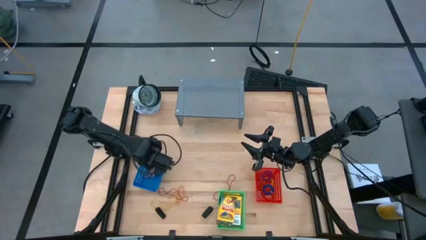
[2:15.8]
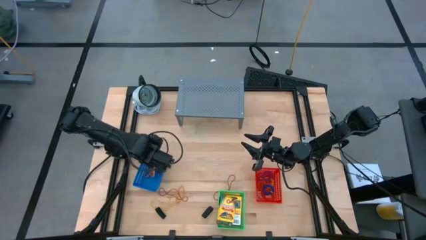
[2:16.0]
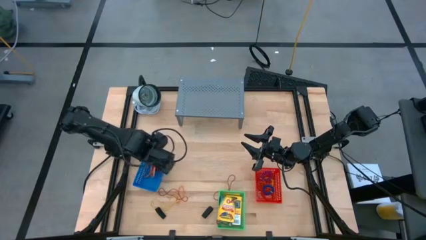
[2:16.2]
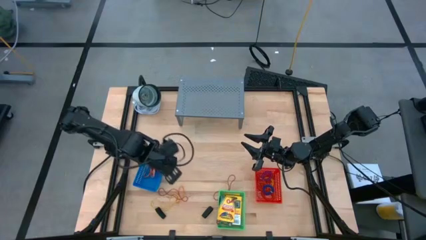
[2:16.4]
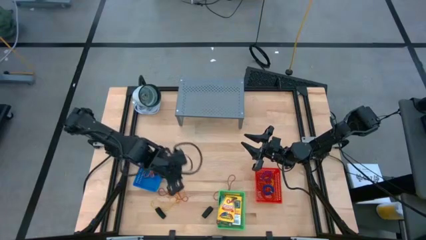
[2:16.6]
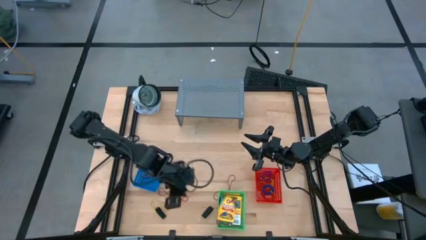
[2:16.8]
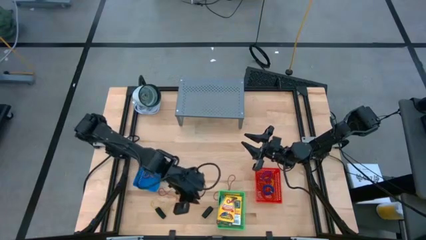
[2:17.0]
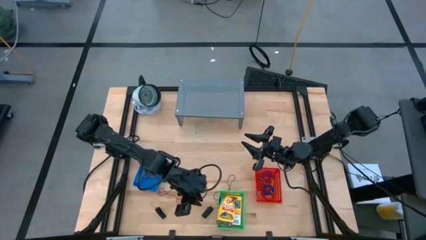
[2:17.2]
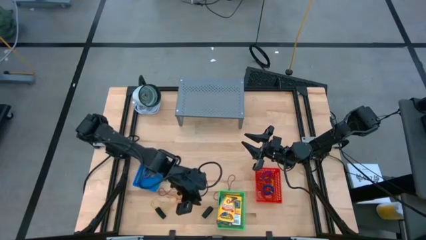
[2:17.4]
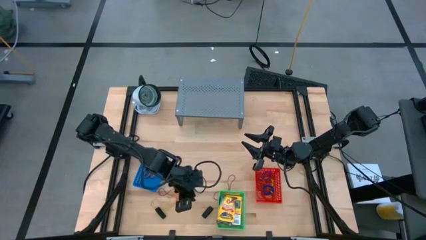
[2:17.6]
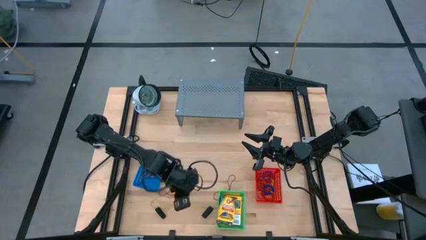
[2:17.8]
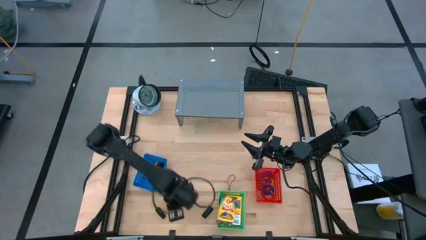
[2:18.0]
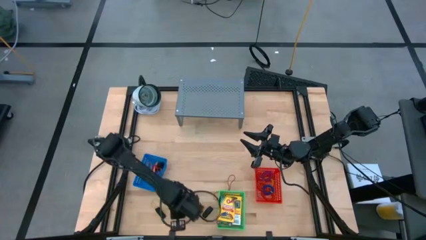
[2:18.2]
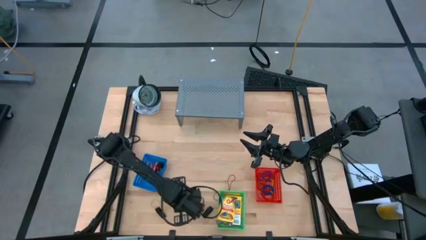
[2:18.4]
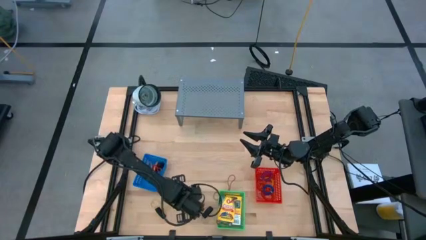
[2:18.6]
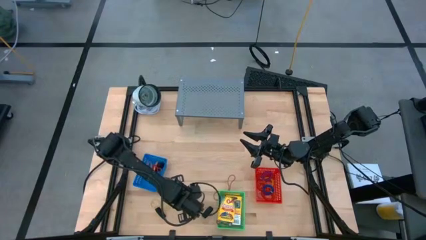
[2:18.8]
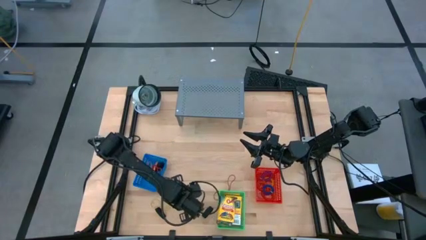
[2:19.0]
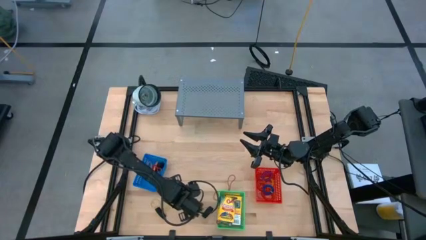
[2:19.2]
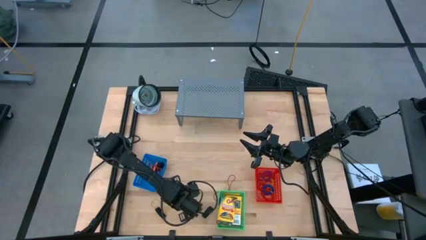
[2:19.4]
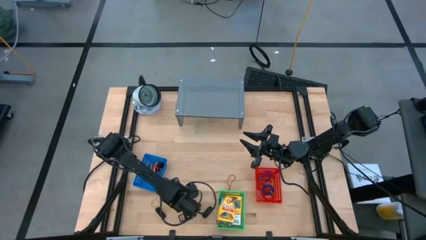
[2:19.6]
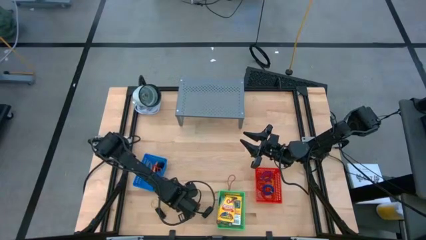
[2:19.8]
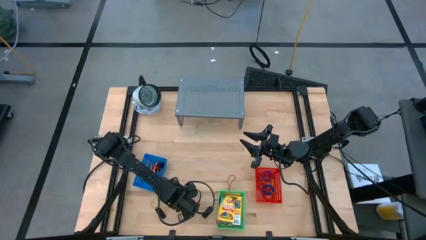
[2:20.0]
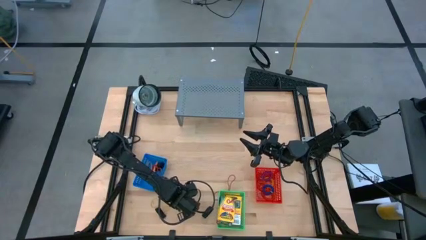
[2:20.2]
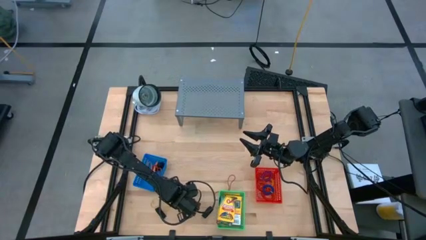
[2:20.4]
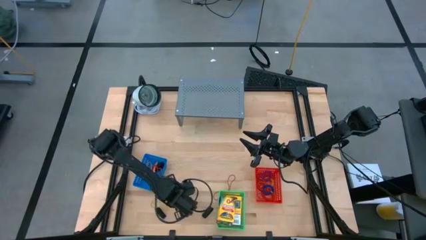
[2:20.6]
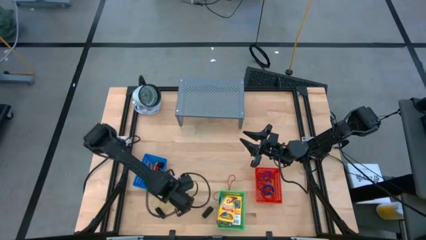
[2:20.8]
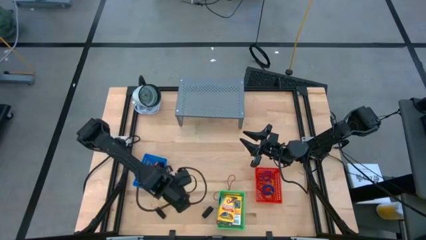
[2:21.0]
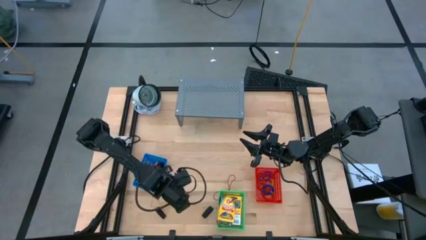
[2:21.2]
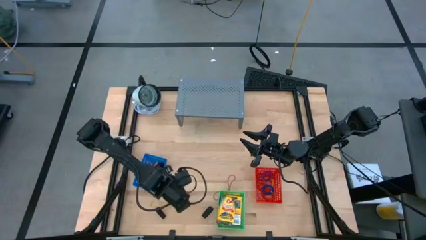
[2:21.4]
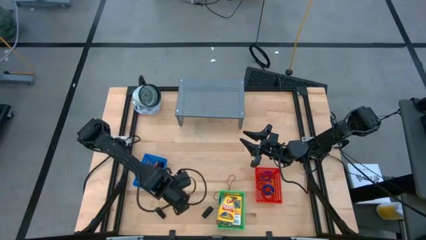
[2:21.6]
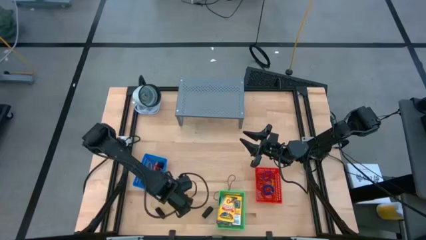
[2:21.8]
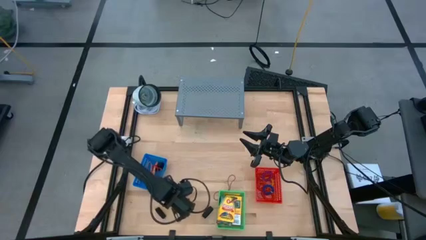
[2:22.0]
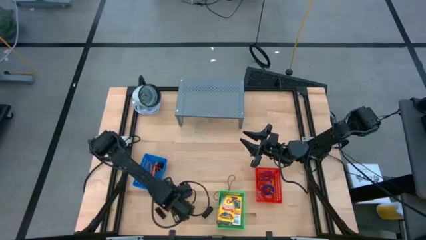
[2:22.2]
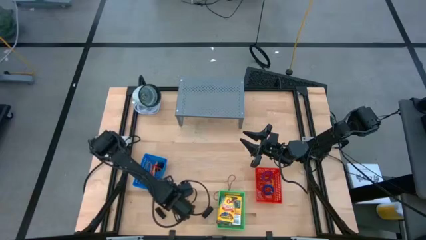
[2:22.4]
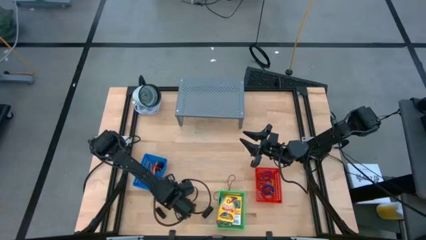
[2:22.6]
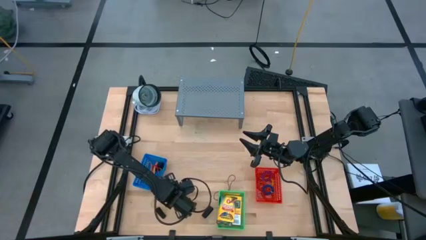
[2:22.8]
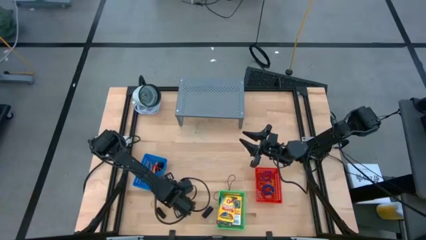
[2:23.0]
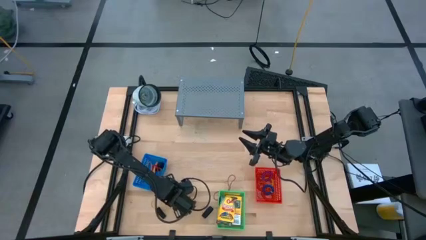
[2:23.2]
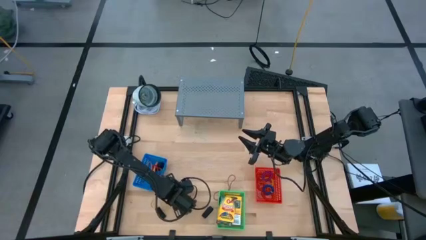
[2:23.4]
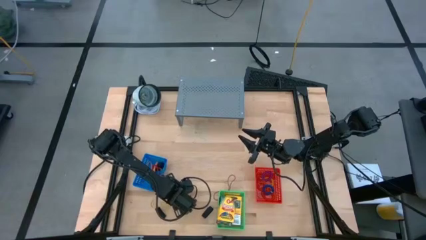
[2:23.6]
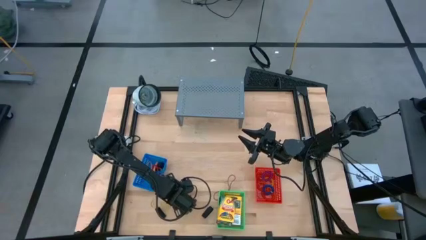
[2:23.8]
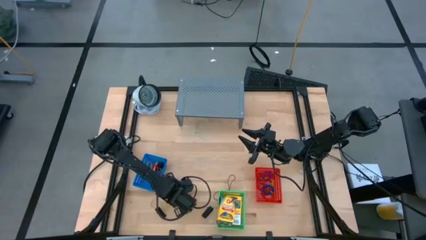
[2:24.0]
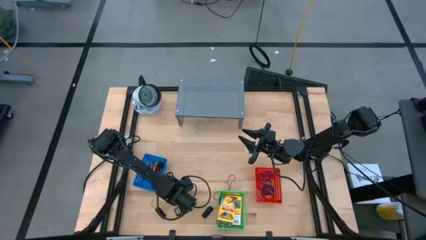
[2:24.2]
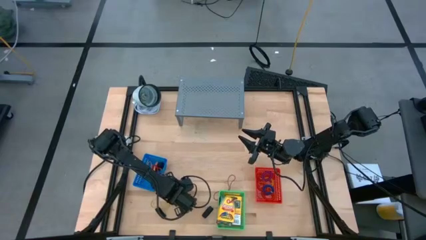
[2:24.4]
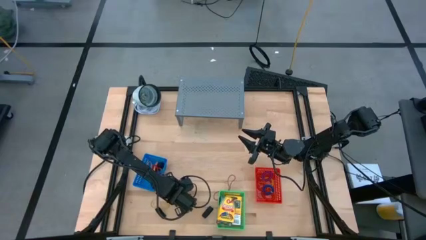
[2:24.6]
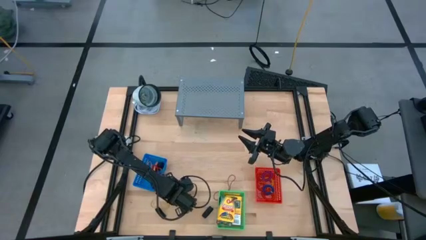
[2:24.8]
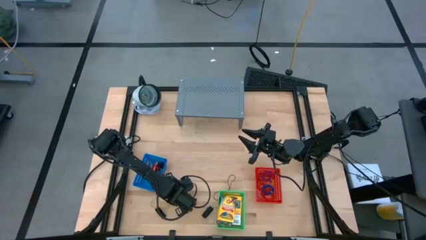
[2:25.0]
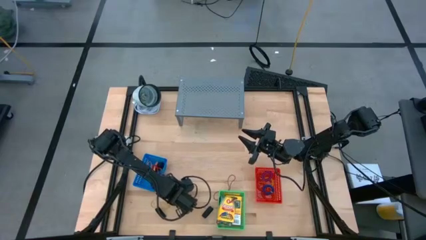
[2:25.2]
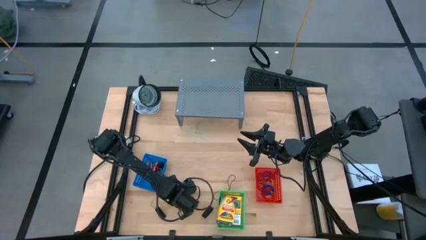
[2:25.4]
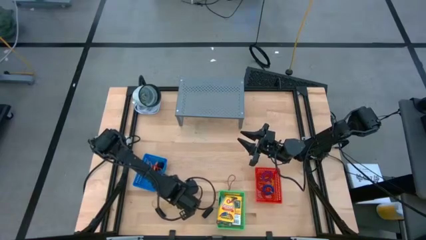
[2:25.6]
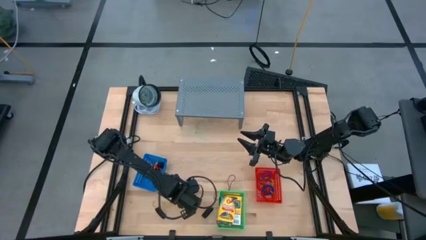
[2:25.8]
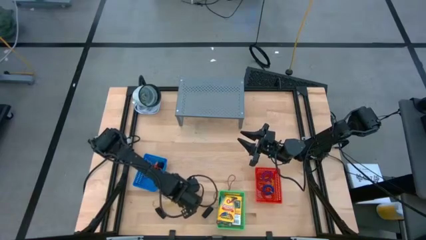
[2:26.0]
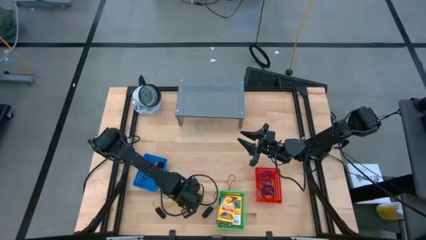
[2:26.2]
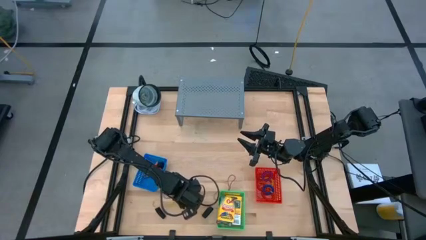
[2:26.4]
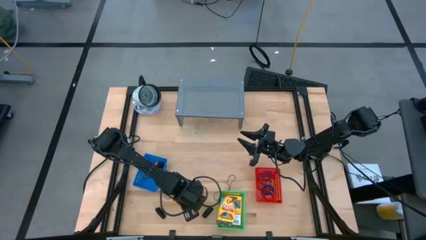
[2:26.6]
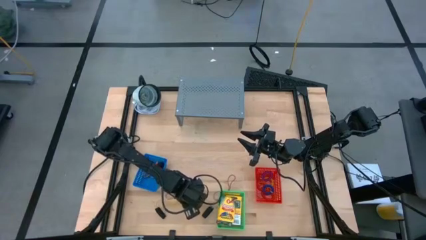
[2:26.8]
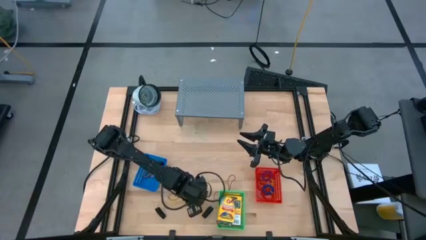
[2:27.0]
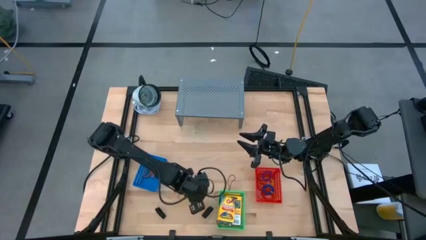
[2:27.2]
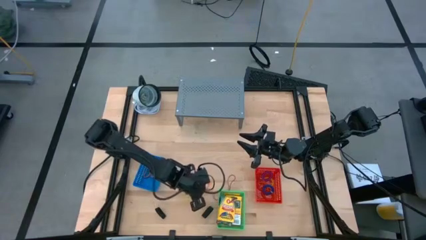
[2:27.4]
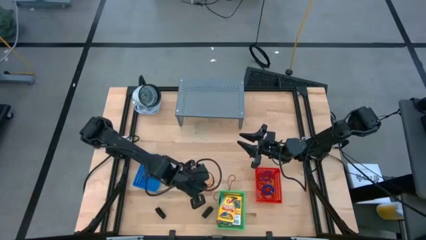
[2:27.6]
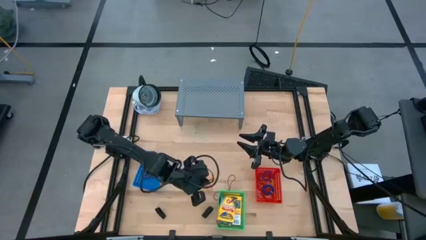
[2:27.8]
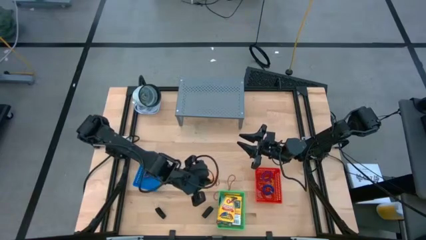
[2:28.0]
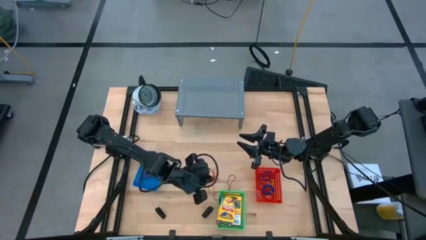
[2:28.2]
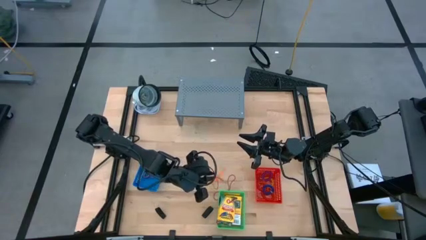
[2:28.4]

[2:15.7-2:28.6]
Task: Pick & Place Office Desk Supplies
Put the red rubber band into the blue bin

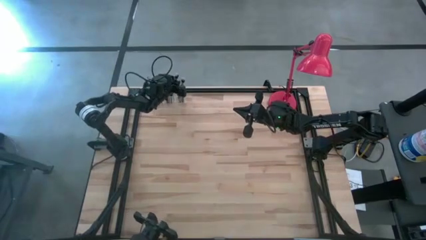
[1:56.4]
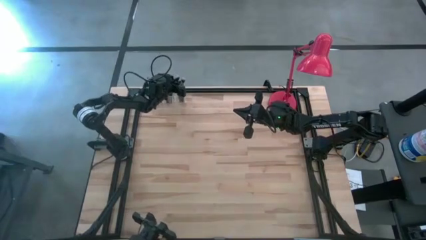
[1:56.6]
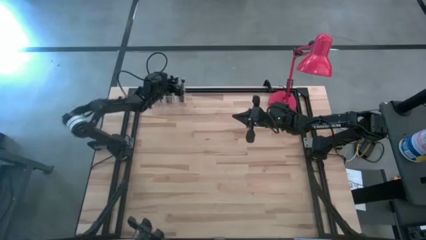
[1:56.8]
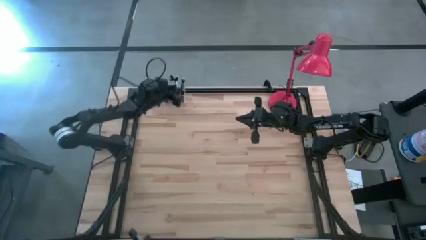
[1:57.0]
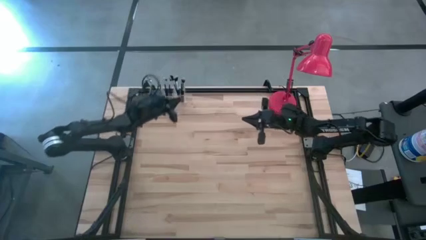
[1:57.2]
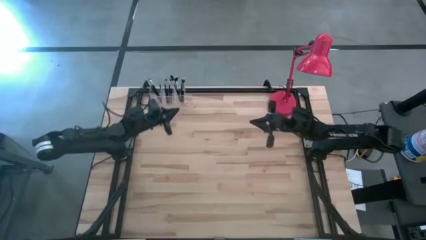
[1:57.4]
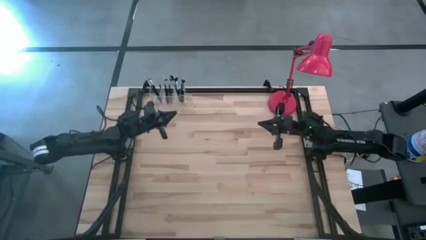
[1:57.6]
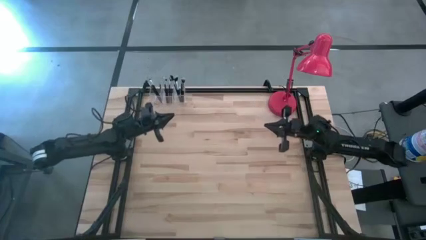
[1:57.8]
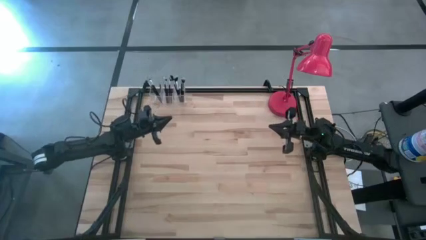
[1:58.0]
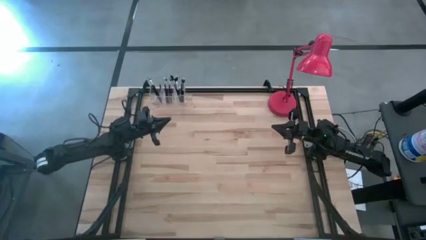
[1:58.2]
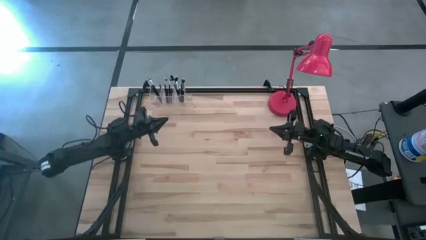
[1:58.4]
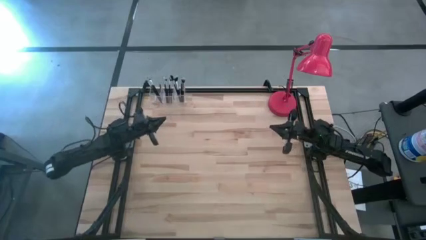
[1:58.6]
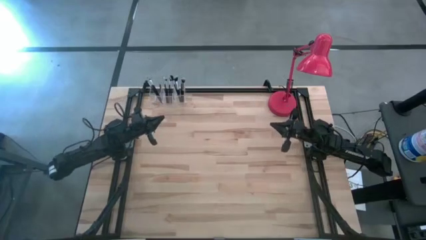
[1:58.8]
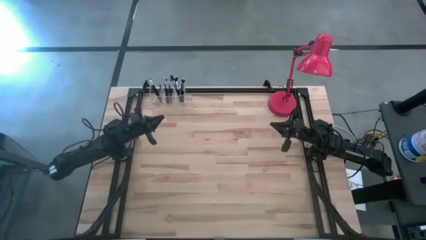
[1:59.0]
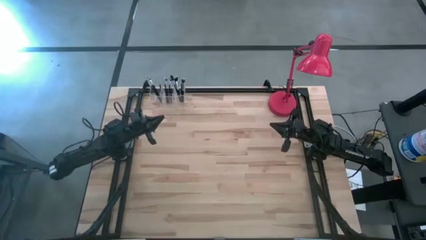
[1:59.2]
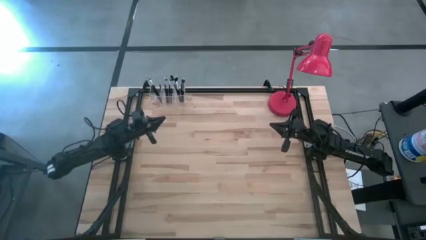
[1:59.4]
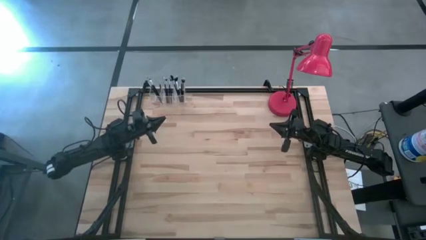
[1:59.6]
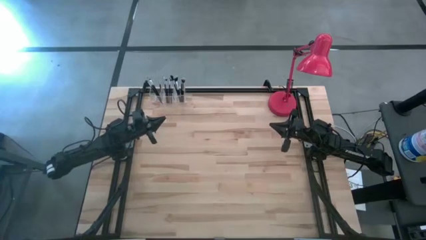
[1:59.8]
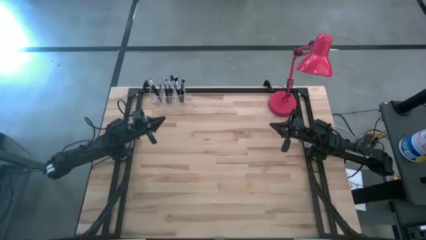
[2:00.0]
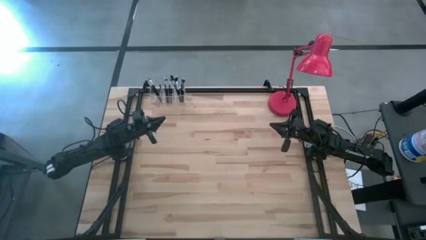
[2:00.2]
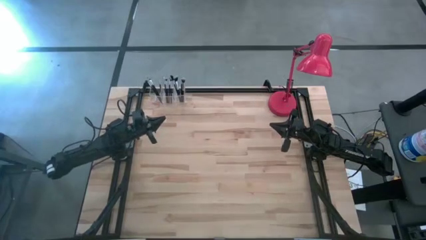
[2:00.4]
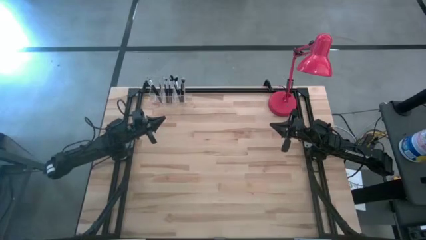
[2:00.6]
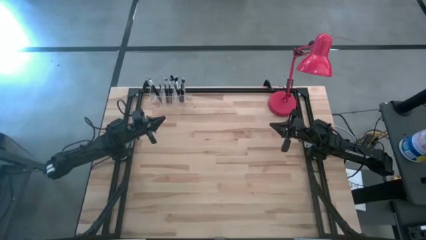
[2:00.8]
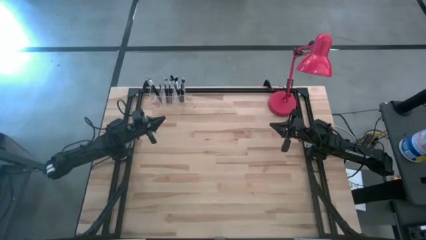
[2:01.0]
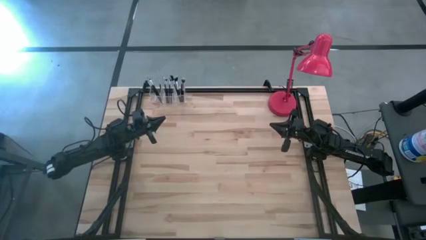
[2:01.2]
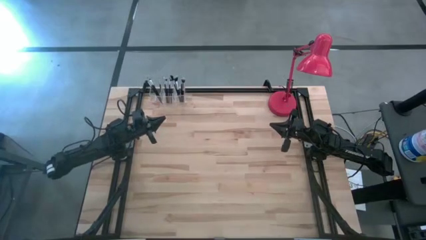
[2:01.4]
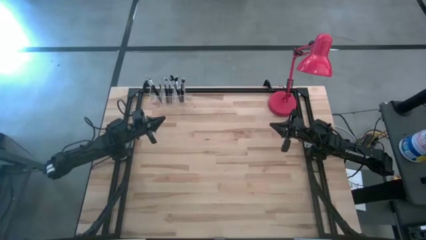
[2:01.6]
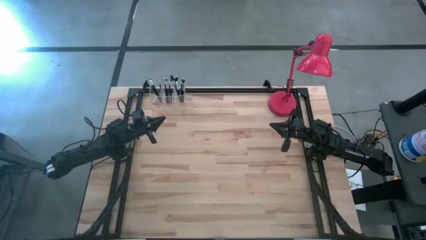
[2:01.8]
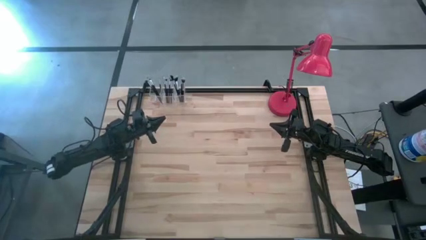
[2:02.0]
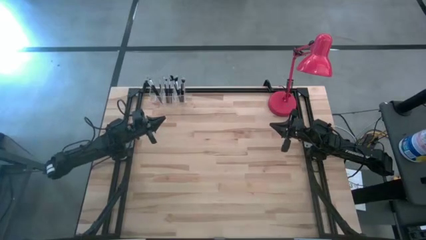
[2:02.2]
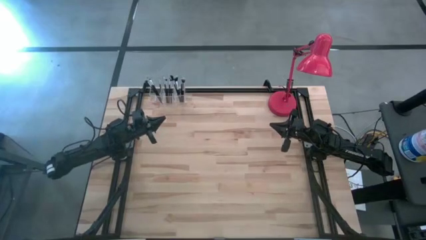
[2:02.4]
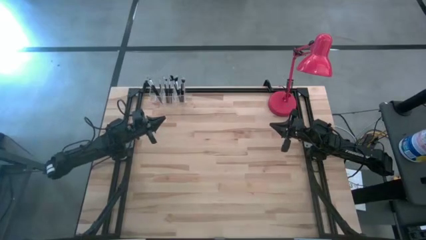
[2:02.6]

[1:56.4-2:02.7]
Task: Pick & Place Makeup Brushes
Return to Home Position
